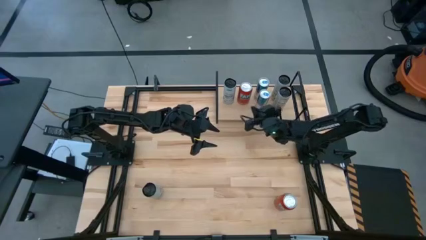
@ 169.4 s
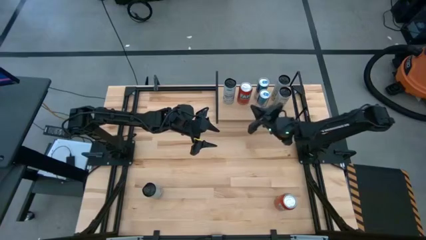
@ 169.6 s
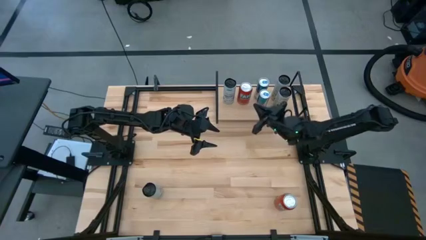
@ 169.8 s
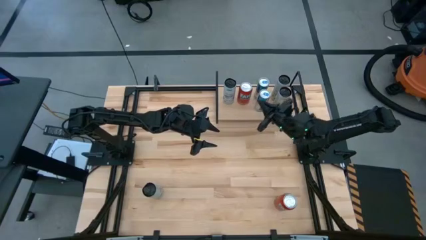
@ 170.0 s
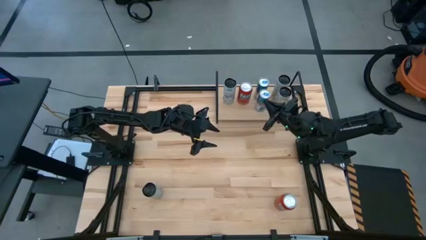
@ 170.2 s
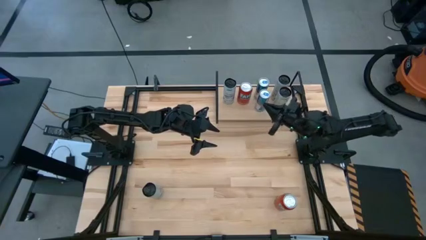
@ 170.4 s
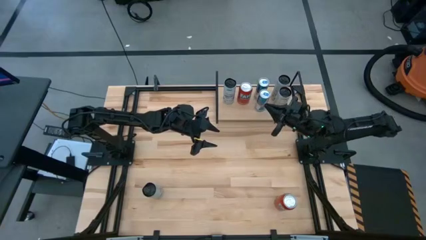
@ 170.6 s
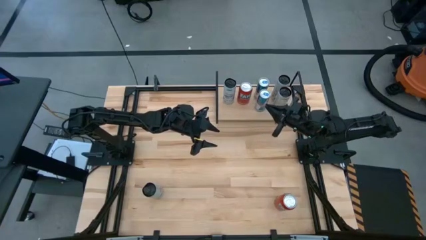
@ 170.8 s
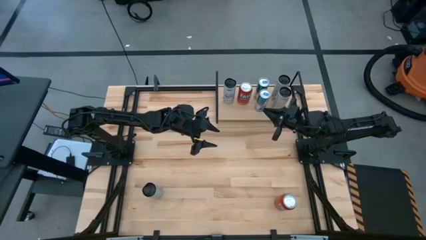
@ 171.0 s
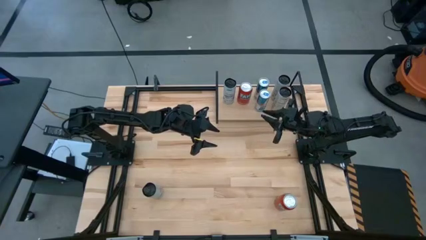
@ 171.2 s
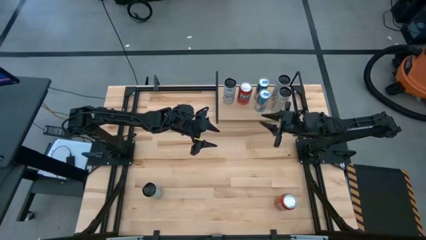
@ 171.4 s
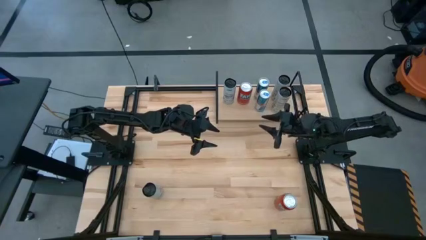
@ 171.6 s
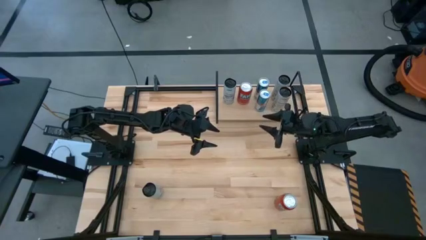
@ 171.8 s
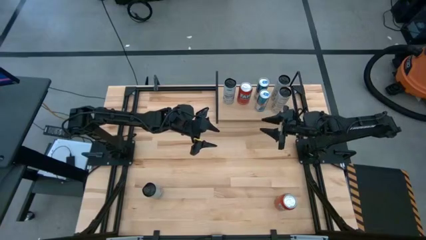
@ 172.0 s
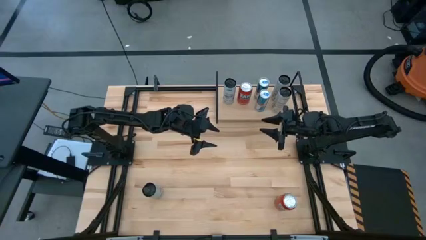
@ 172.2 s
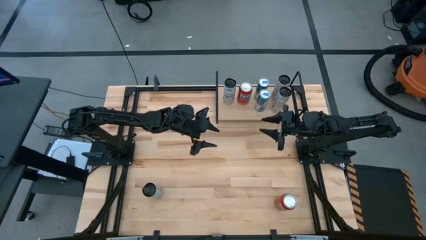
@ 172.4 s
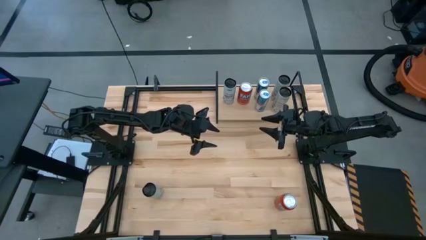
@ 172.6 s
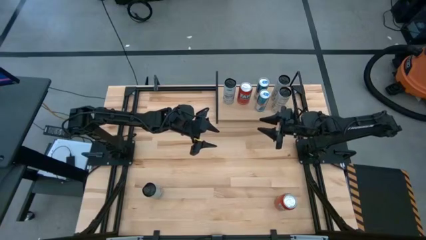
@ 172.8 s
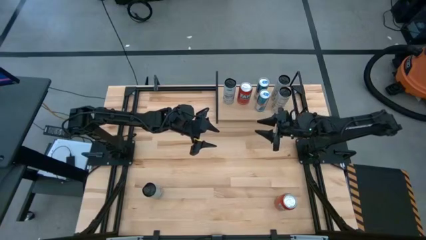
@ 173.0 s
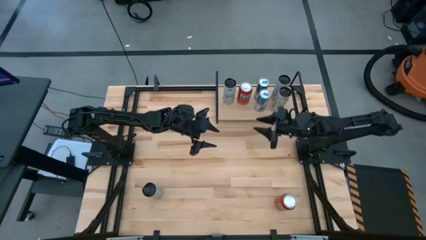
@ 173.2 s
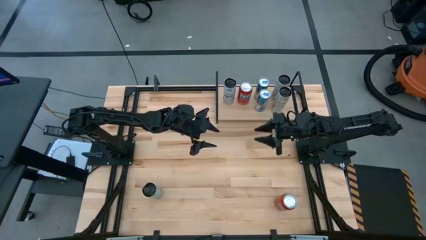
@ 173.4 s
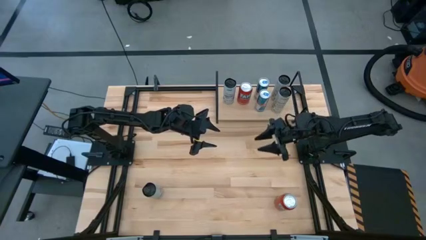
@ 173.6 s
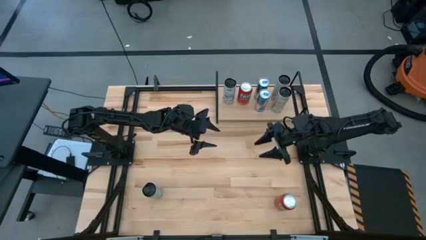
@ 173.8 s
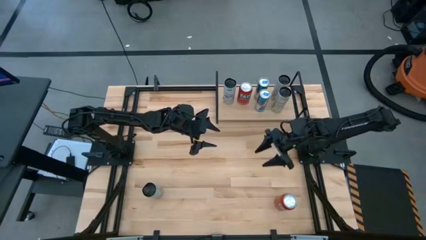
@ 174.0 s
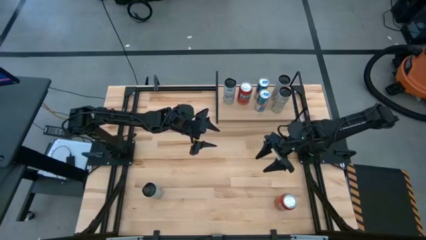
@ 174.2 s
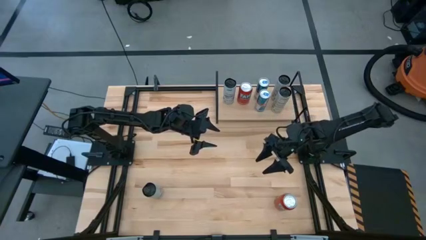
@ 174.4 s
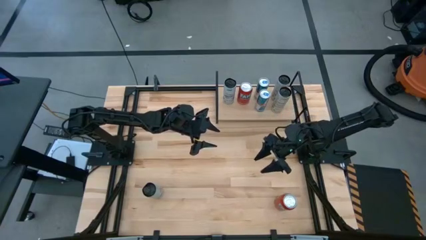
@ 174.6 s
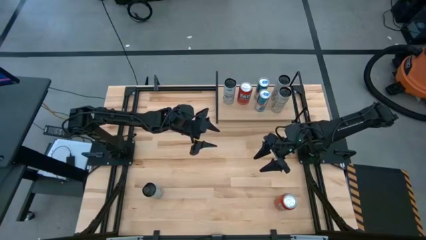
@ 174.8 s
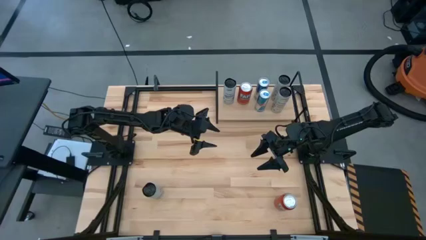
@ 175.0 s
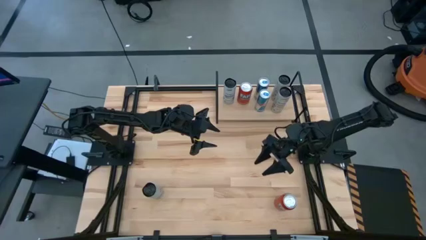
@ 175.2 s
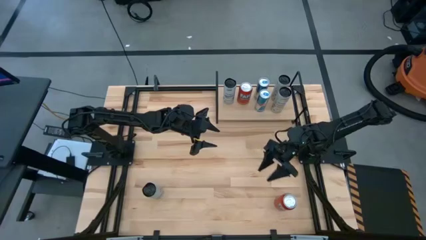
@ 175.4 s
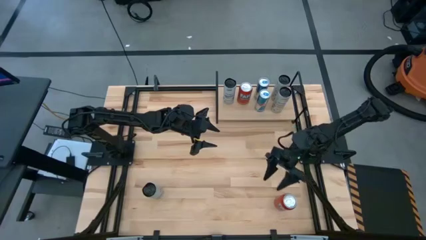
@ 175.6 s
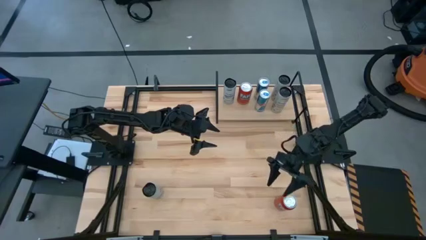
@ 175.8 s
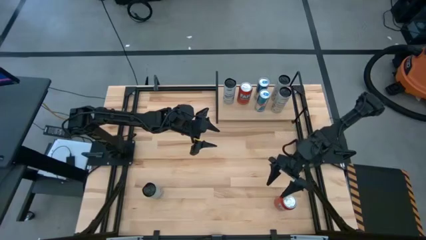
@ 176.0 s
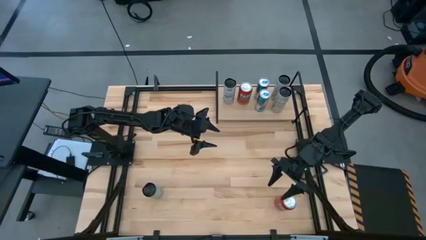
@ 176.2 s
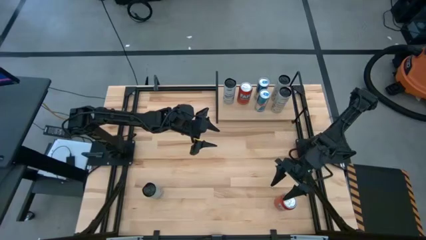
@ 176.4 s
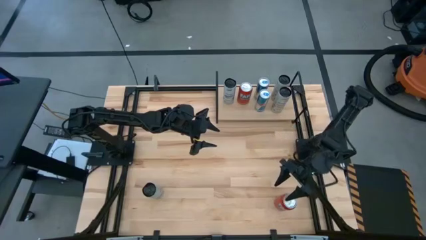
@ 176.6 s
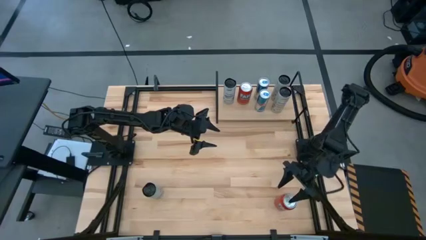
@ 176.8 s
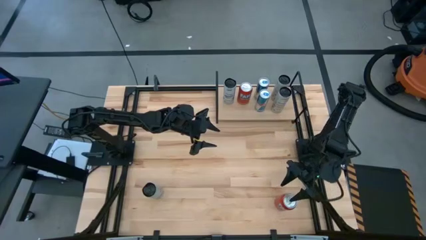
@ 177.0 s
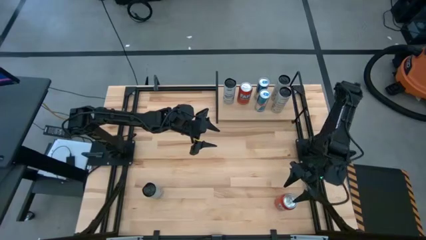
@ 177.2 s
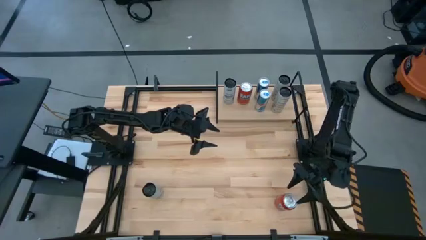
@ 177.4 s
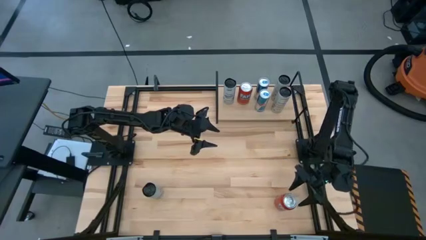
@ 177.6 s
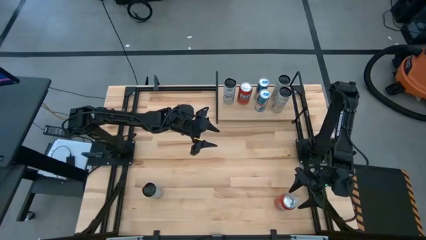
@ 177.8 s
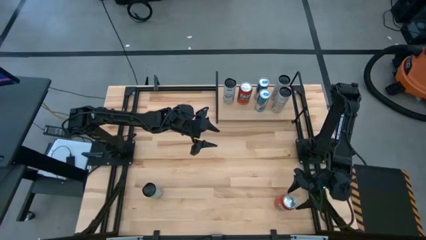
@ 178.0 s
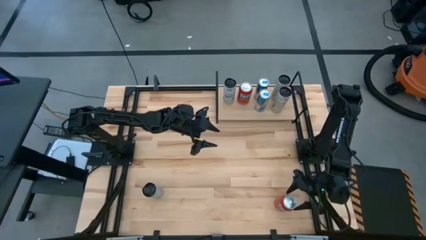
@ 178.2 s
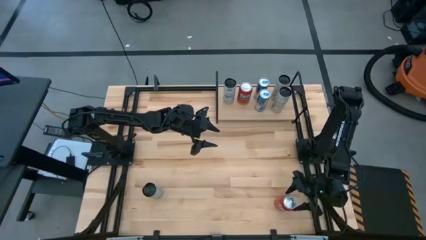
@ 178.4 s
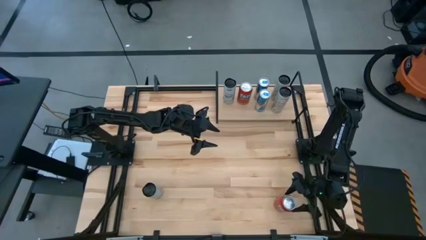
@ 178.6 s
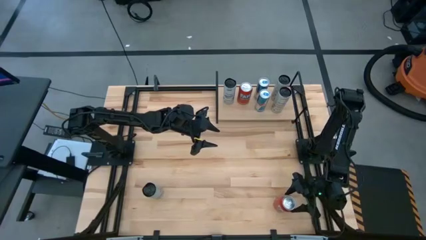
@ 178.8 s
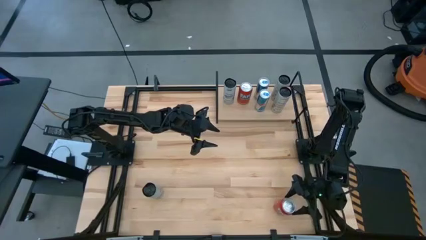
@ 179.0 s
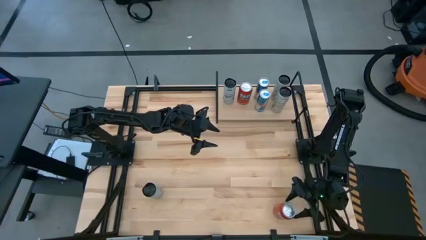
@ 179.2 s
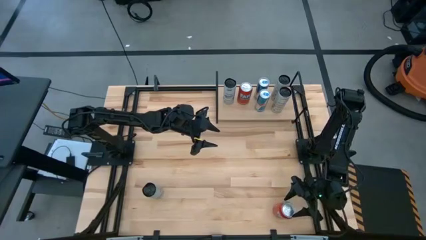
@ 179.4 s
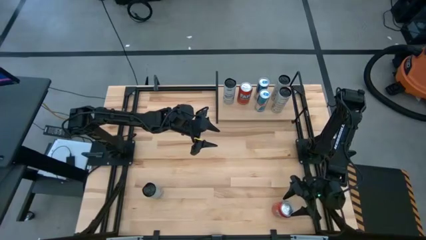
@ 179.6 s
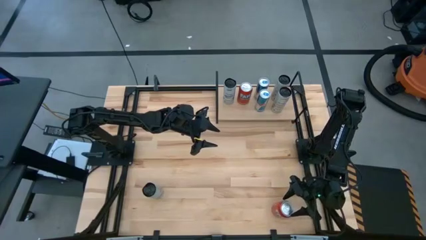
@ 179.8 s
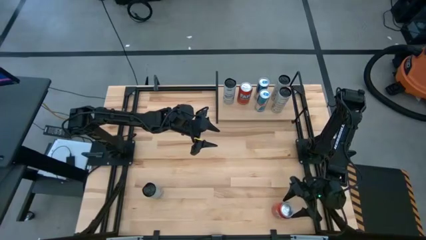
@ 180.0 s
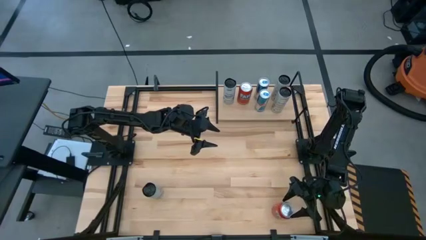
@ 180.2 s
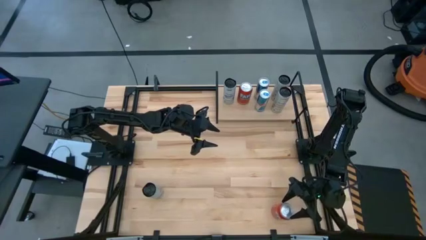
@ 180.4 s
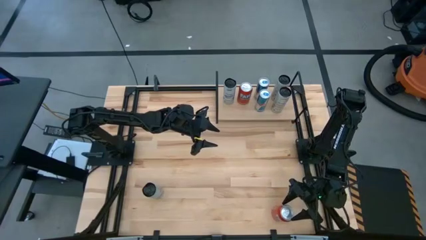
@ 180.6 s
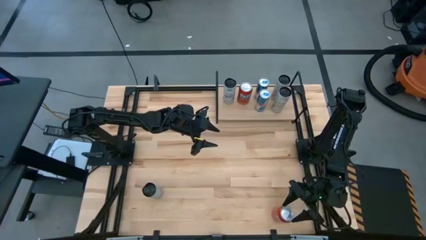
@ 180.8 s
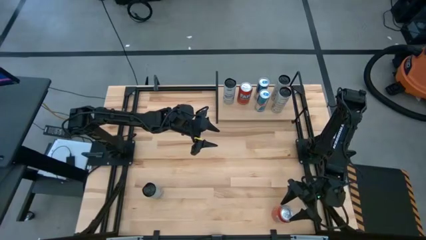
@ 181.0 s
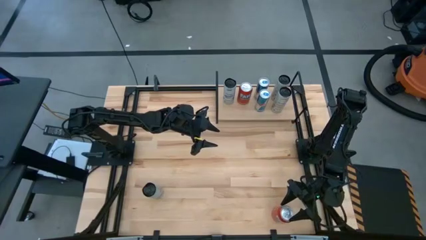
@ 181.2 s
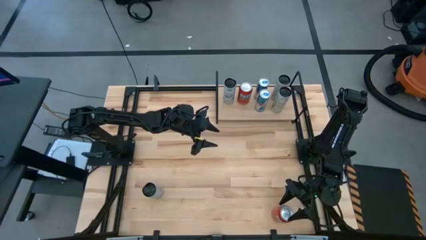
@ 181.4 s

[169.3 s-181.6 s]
Task: Place canned beverage on shelf
Put the red soda can on the shelf aligned with the other red soda can

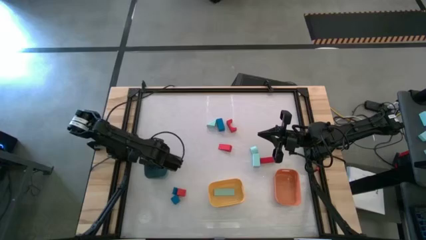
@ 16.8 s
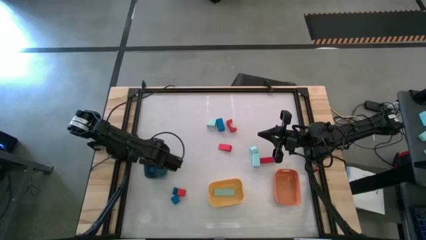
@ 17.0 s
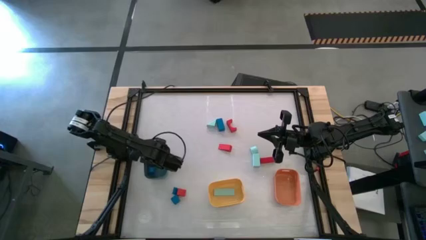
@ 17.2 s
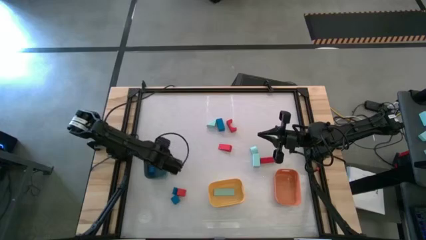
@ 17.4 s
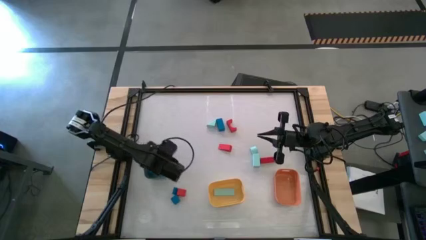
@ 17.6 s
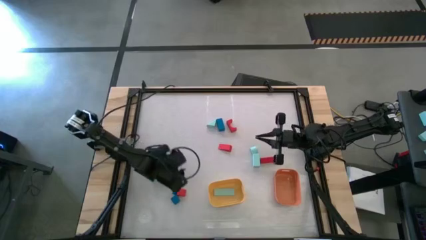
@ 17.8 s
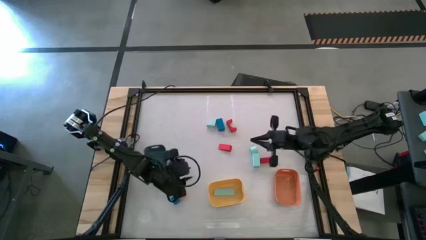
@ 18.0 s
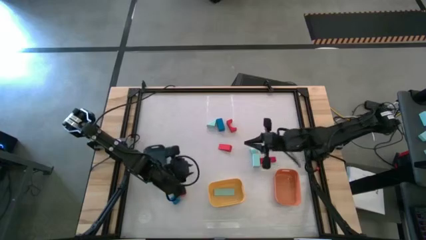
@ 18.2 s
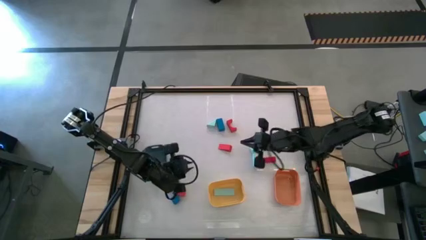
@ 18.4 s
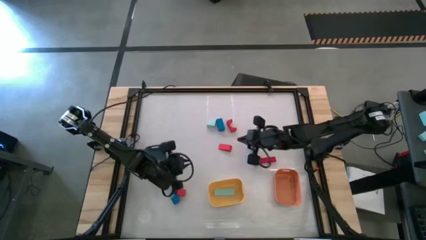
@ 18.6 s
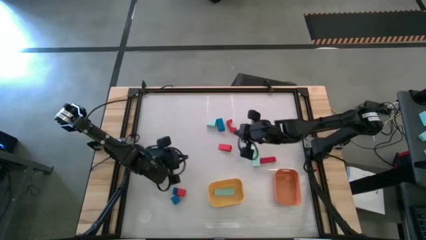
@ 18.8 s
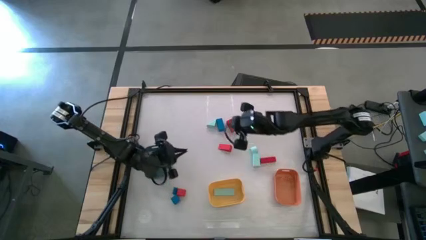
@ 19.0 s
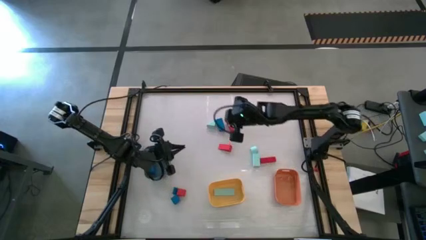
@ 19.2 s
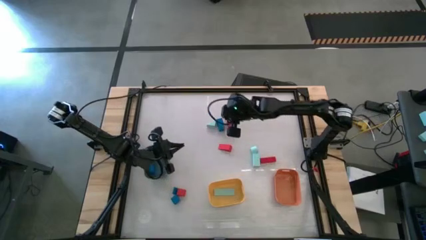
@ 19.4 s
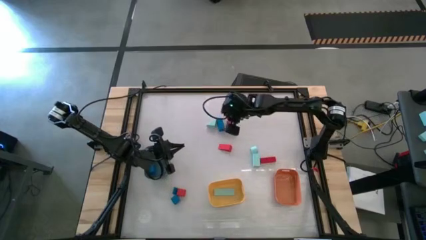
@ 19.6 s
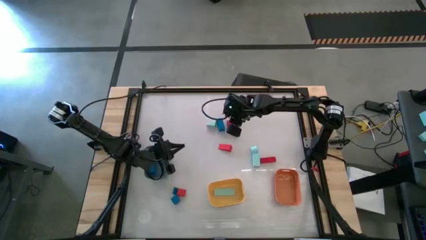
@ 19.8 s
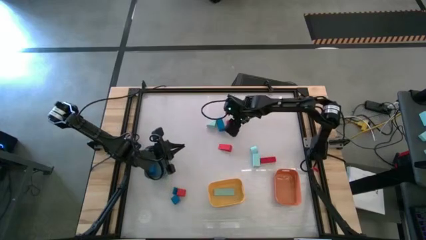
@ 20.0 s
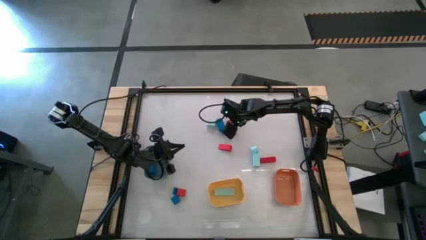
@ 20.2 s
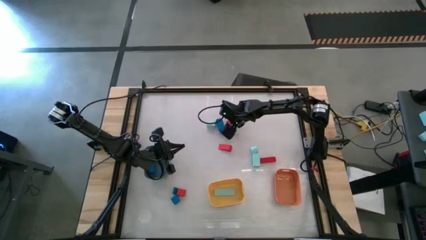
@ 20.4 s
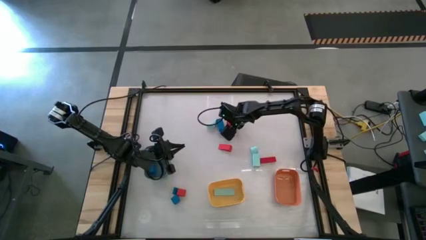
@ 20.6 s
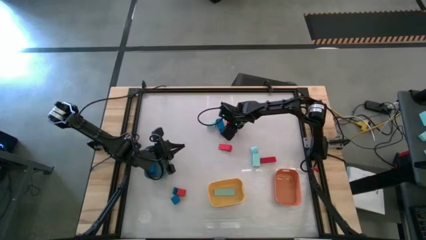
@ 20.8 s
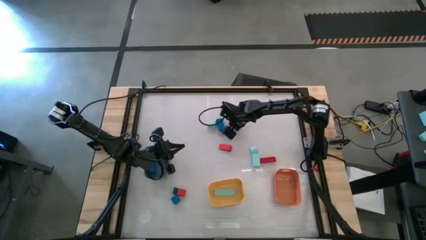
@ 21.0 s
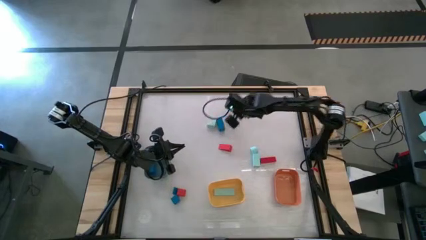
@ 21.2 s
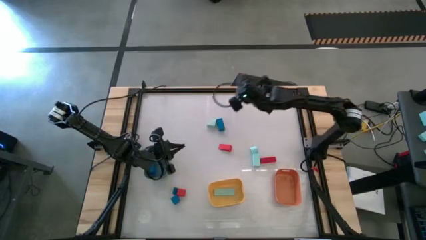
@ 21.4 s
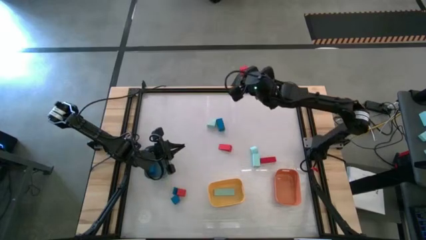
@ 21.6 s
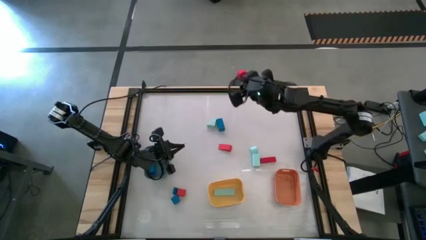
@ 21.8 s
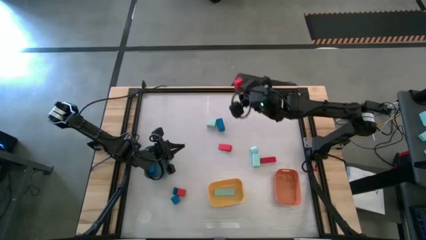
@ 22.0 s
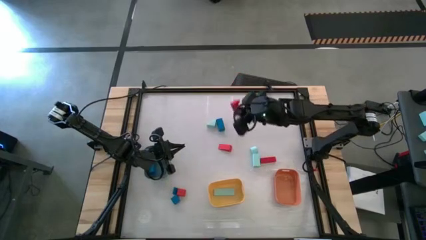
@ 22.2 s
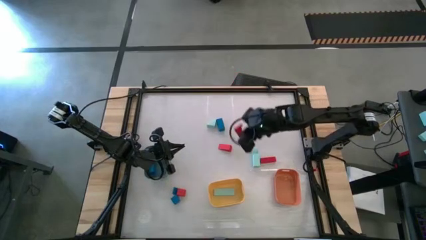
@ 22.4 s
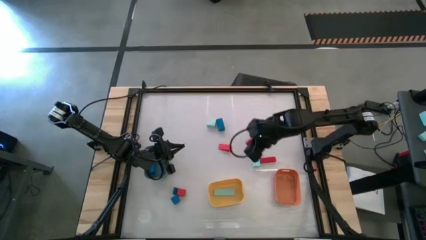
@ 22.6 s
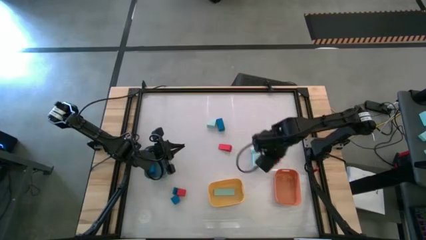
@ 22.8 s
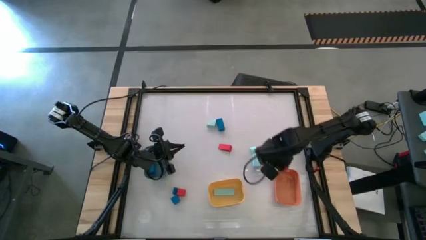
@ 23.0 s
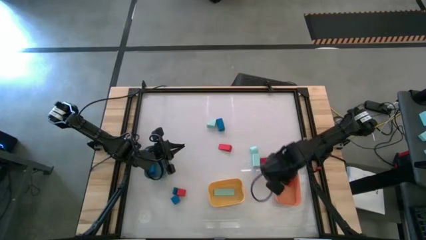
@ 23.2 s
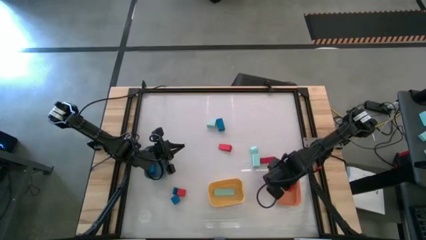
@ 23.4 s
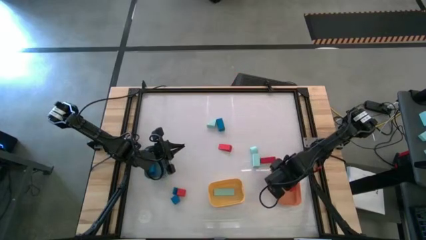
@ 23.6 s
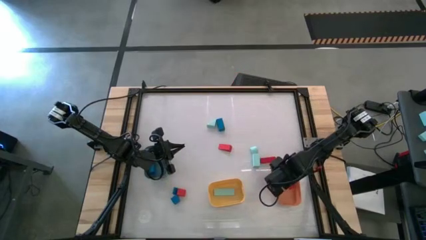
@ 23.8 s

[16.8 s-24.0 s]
Task: Sort & place blocks by color
Put the red block into the orange bin
